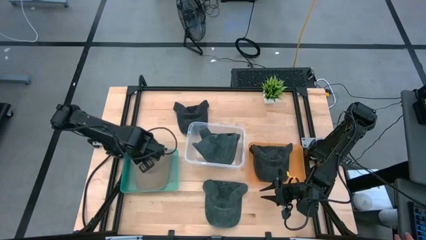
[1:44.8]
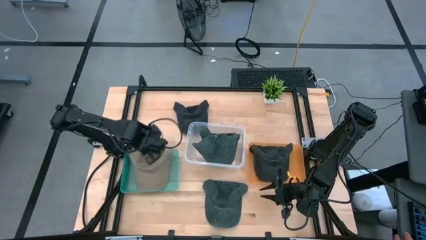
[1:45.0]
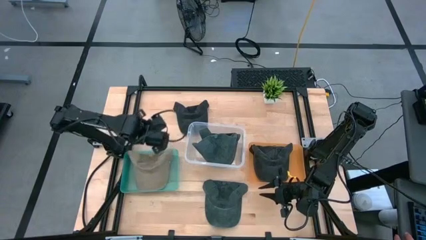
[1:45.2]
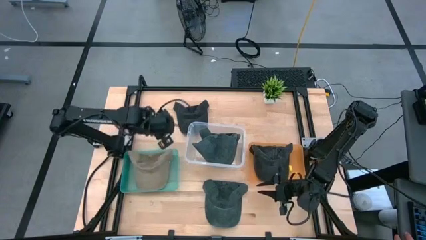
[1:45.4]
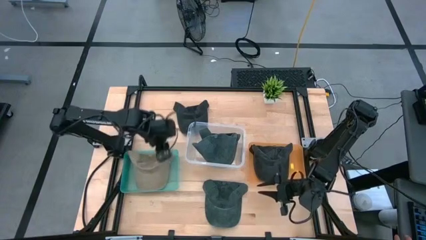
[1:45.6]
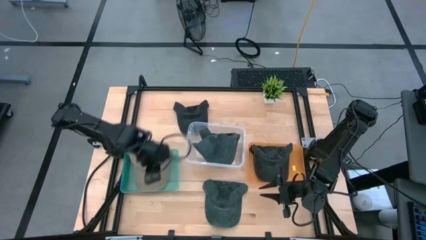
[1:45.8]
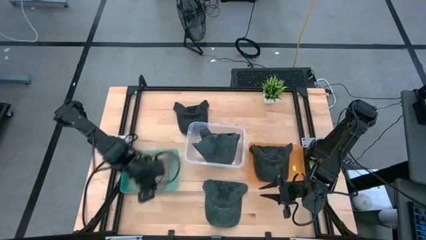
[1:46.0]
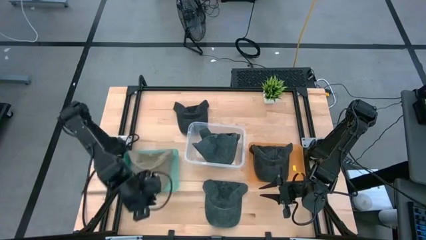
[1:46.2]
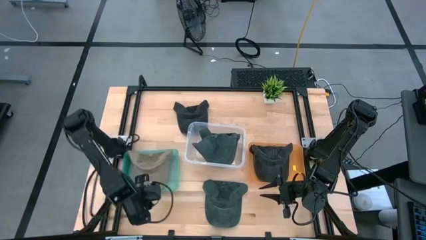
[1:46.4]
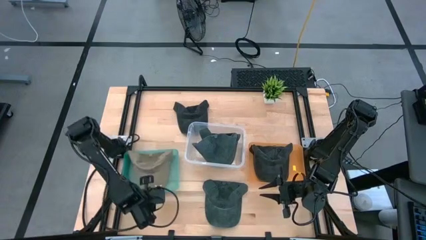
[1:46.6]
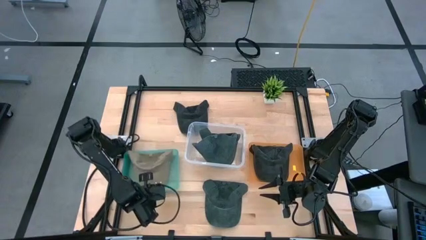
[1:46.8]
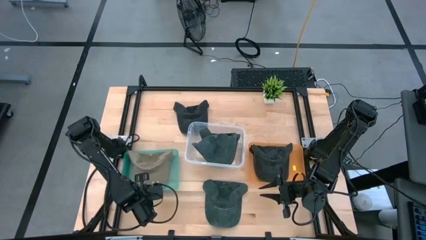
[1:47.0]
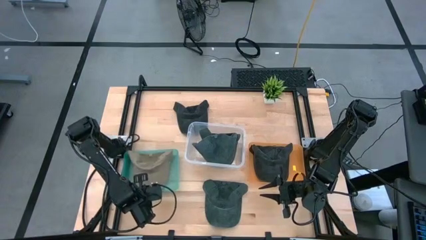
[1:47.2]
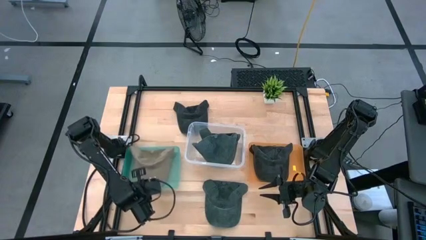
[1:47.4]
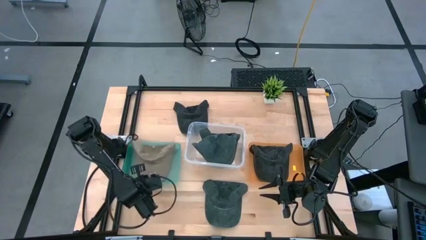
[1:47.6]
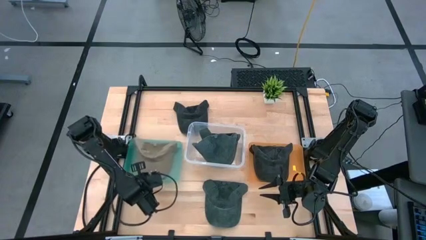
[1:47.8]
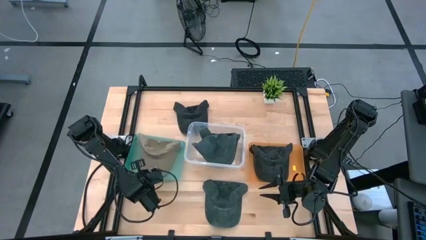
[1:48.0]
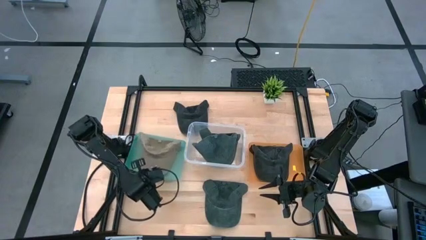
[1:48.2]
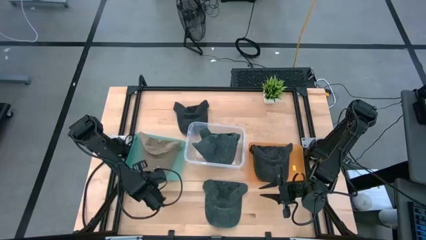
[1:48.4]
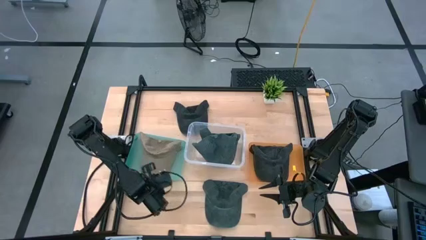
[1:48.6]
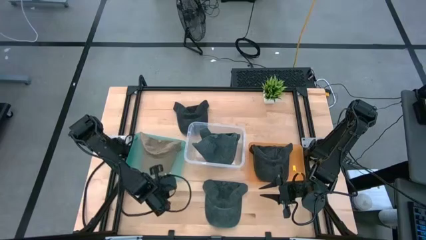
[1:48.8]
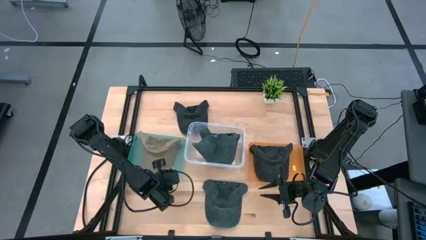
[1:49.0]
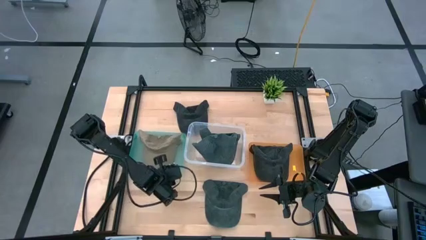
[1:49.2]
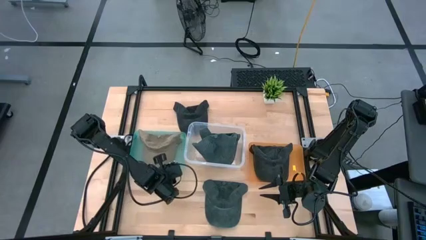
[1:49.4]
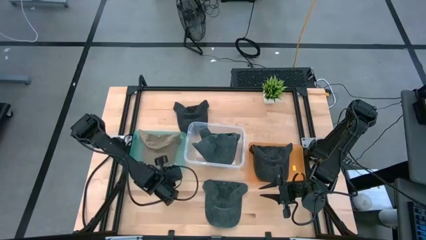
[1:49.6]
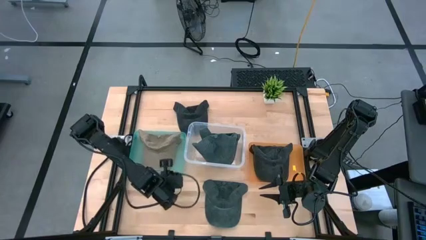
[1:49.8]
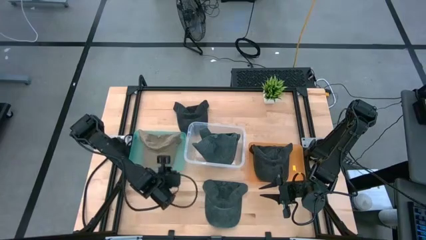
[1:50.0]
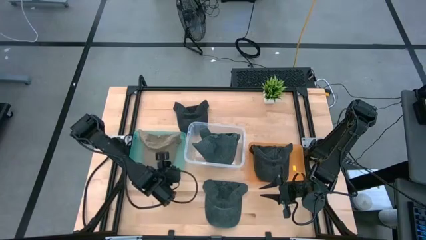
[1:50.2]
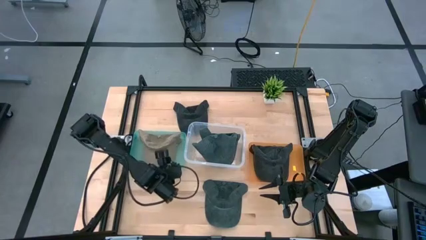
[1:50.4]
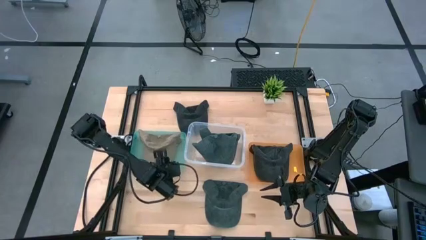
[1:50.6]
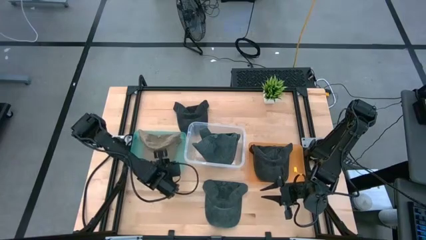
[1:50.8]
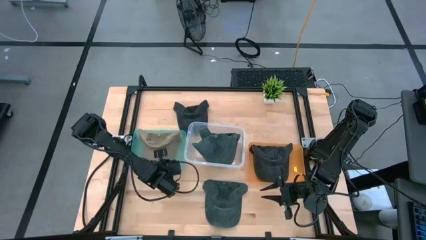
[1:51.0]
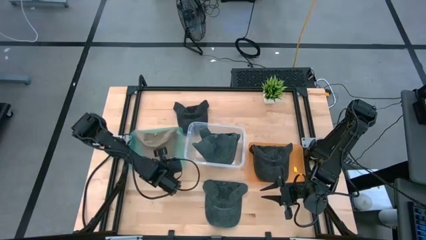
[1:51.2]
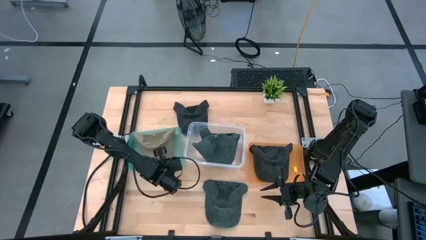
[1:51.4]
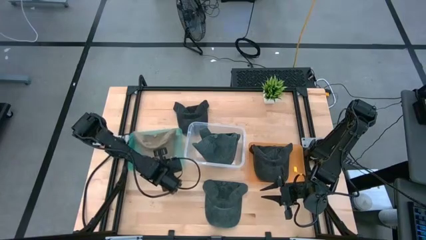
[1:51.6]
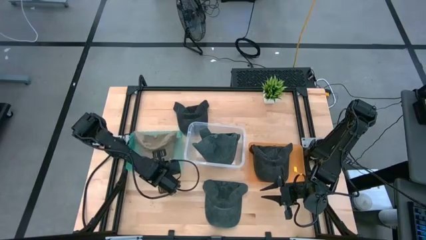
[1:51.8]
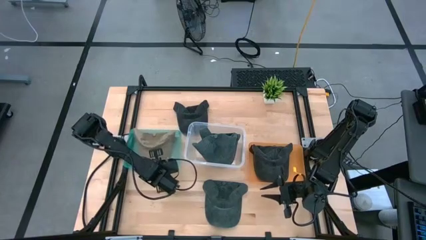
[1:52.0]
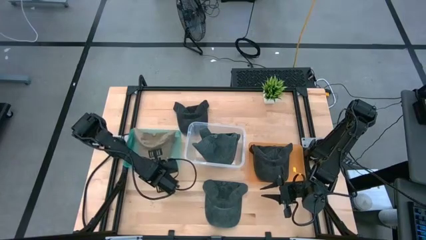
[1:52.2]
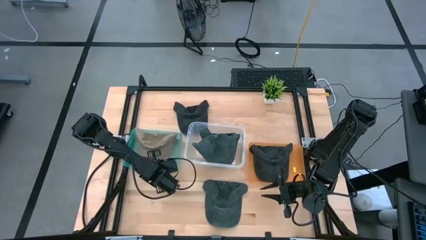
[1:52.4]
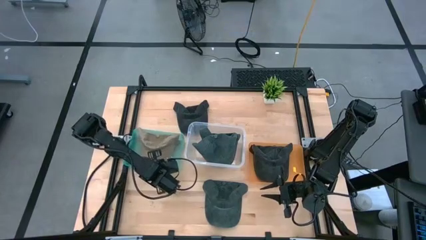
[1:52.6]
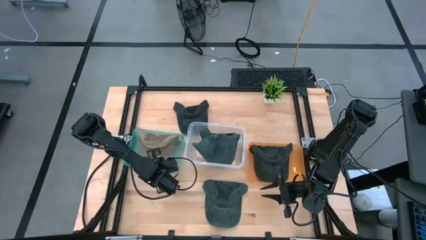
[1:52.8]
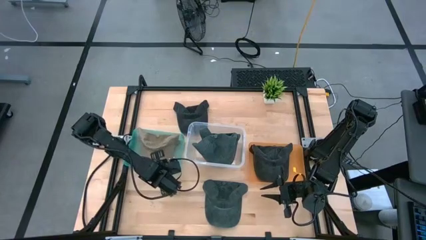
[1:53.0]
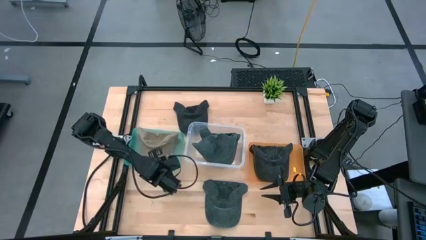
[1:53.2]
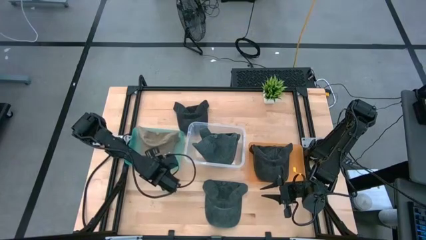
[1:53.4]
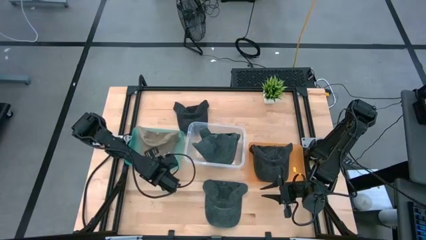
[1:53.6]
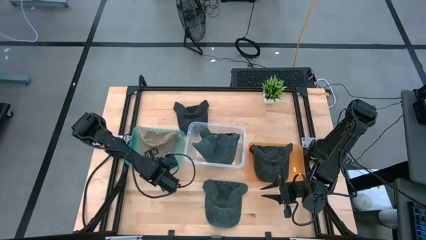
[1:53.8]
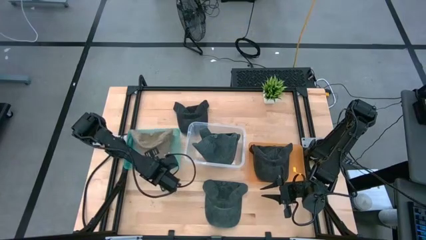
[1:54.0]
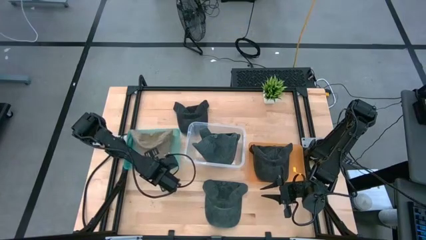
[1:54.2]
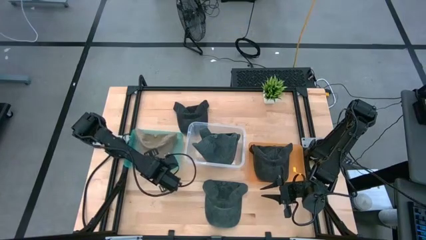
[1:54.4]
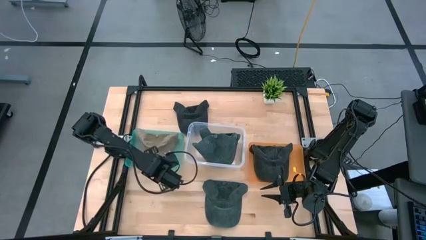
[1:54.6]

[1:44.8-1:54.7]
Task: Pick & Place hat
Adjust the green bin

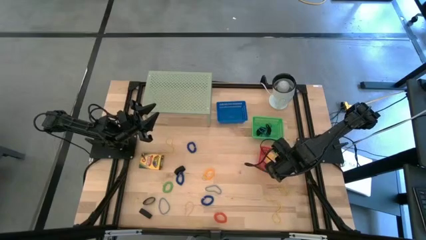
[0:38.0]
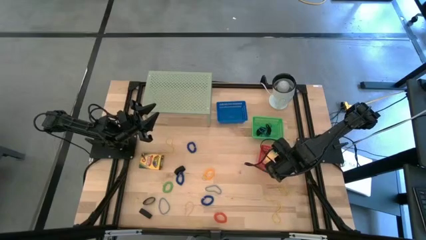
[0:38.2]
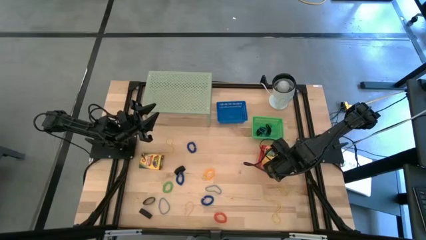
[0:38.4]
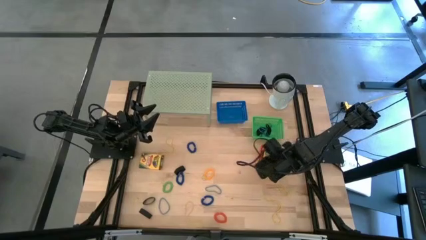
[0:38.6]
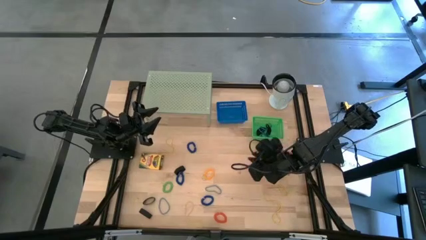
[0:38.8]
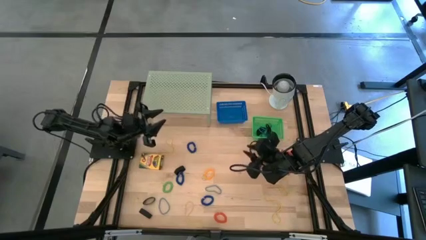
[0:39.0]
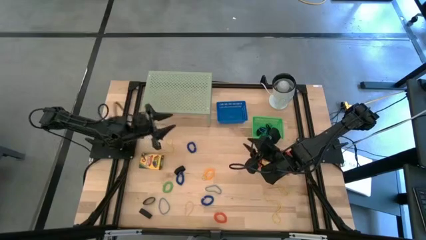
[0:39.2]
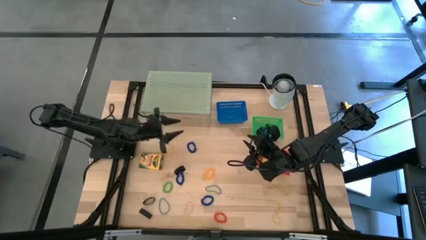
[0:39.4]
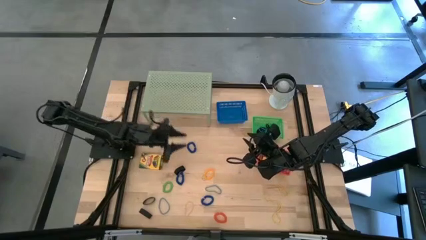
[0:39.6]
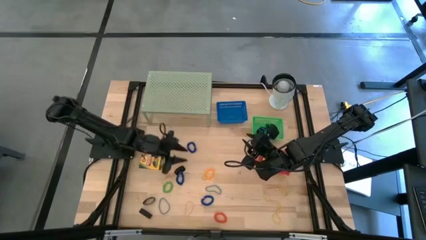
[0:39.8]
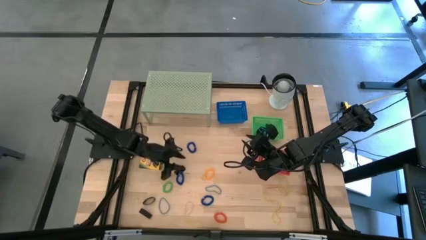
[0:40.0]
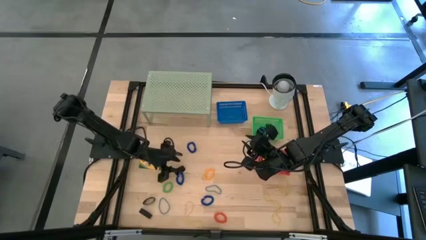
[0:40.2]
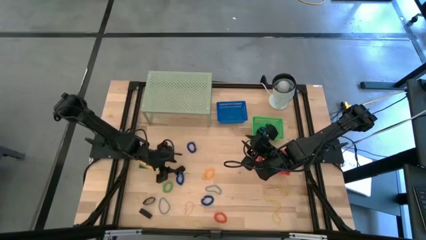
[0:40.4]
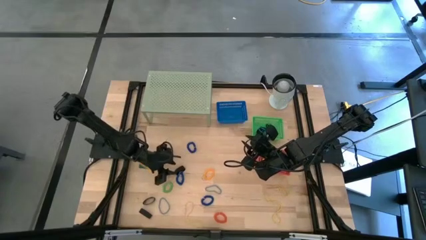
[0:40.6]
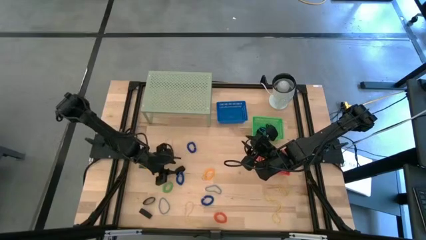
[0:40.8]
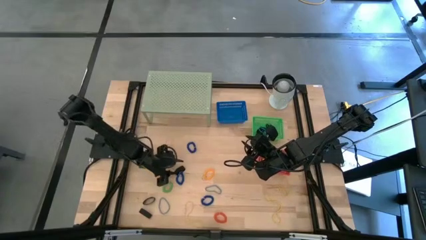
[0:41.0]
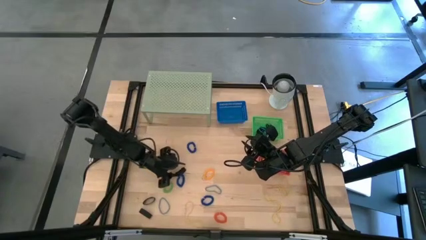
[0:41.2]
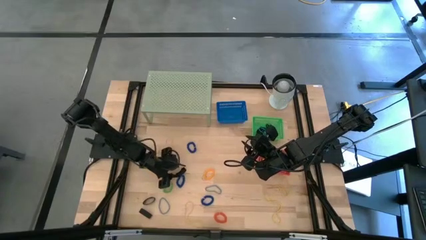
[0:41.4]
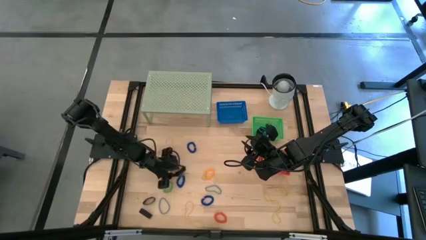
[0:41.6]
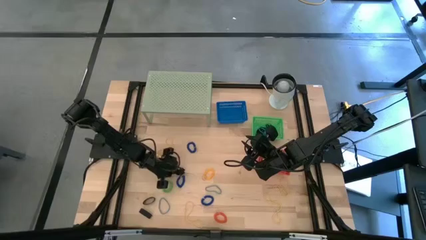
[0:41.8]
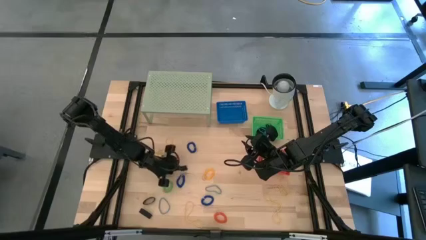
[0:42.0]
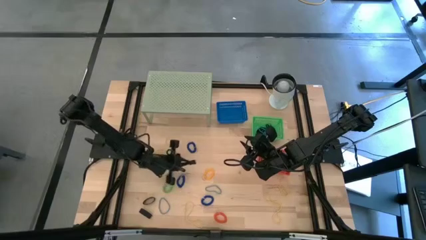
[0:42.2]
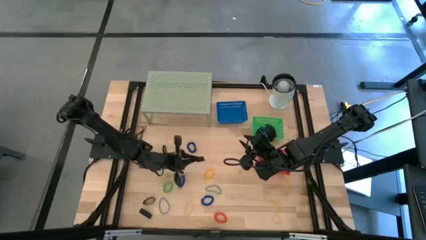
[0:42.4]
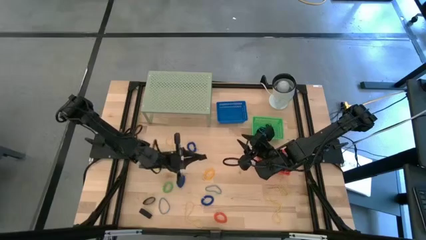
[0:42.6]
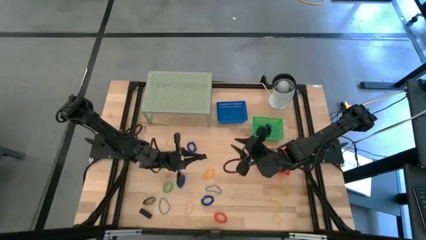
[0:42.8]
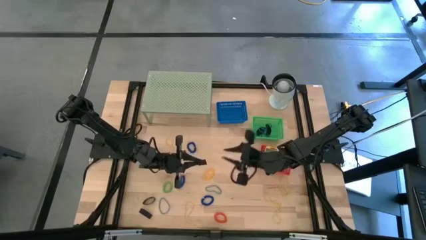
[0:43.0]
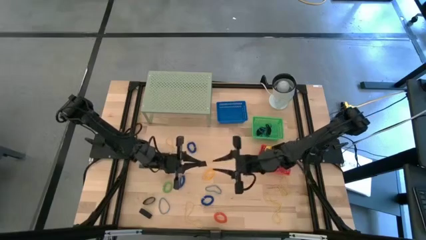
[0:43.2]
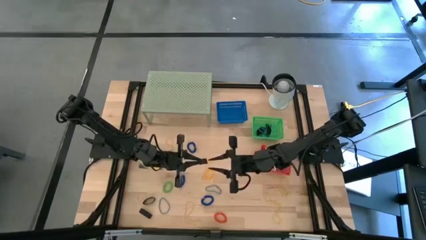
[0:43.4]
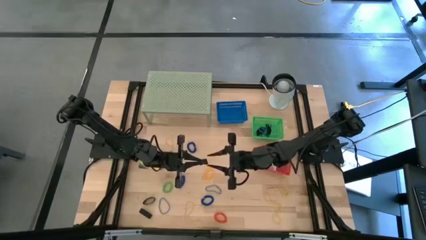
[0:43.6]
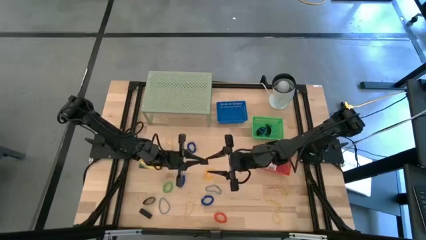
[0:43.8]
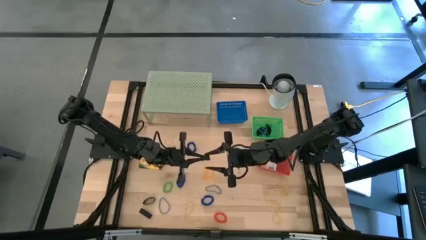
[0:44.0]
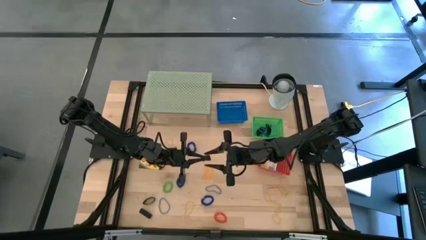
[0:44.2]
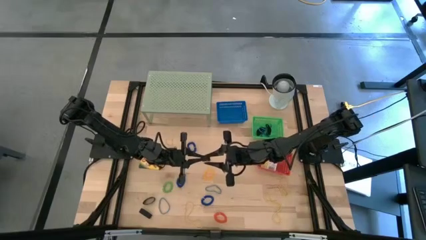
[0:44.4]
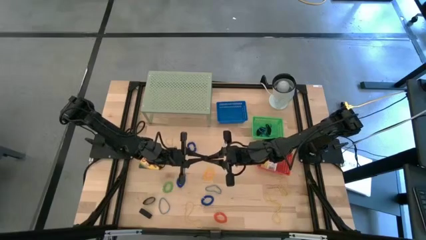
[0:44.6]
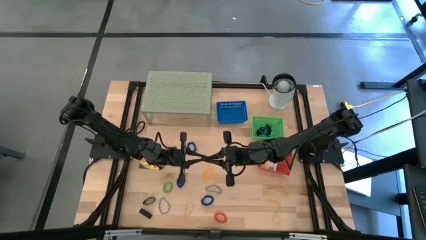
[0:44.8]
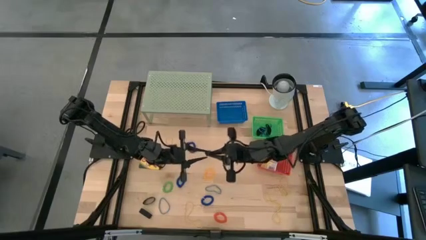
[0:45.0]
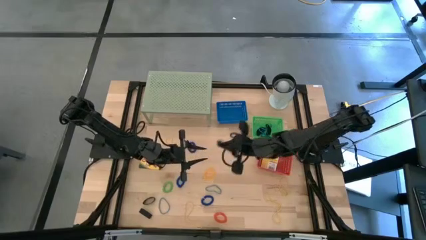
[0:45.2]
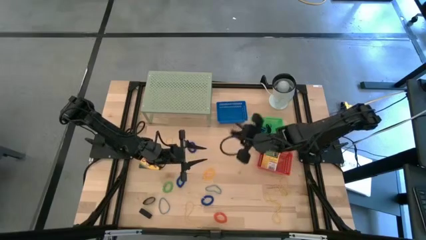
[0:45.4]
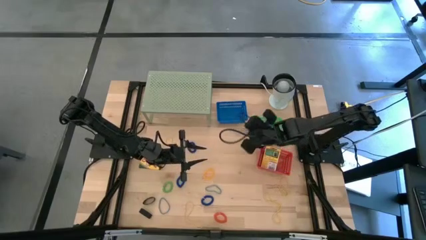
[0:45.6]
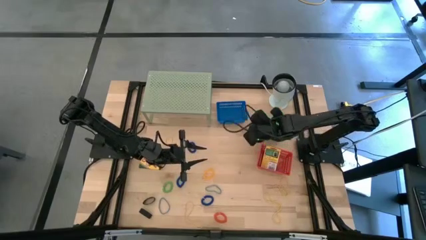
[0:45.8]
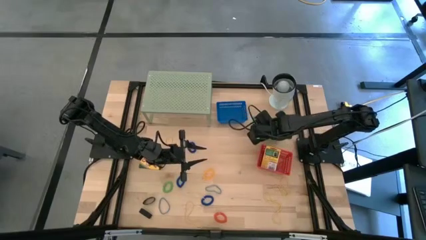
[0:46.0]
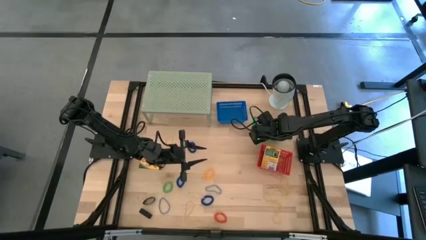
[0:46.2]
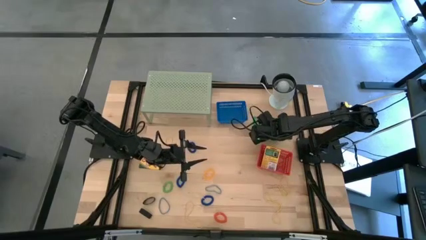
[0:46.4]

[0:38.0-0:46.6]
Task: Pick & Place Office Desk Supplies
Put the black rubber band into the green bin
